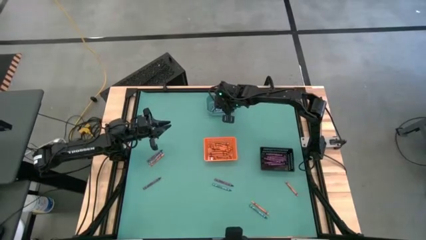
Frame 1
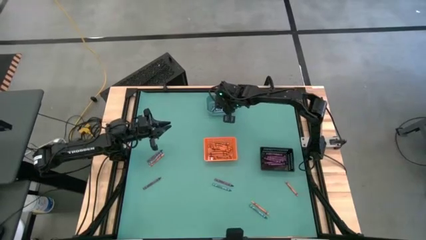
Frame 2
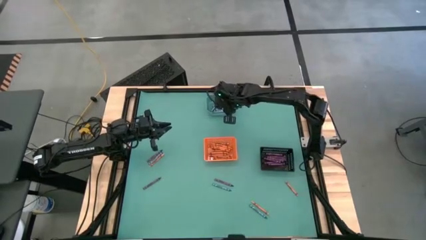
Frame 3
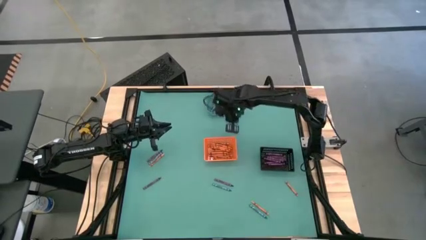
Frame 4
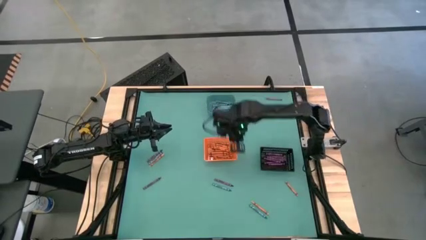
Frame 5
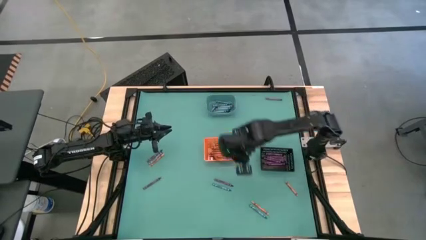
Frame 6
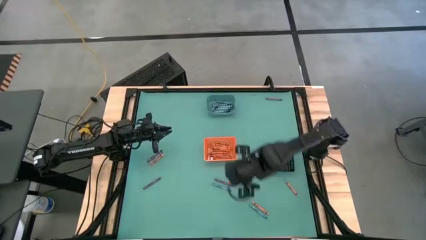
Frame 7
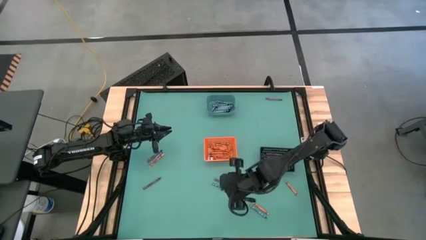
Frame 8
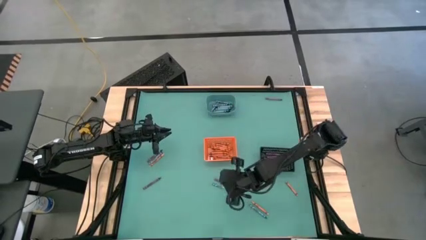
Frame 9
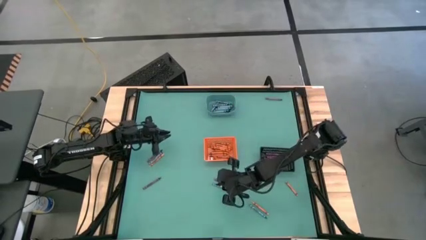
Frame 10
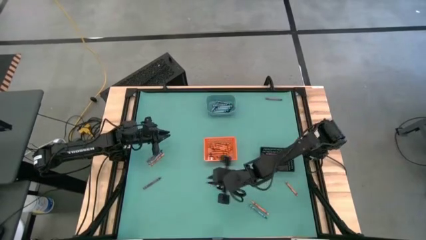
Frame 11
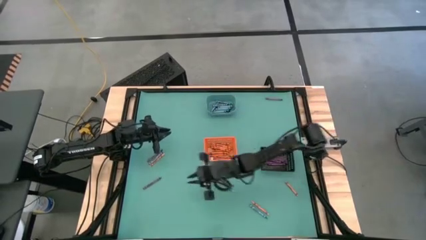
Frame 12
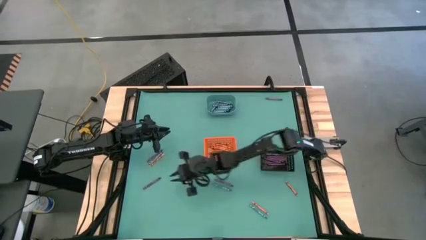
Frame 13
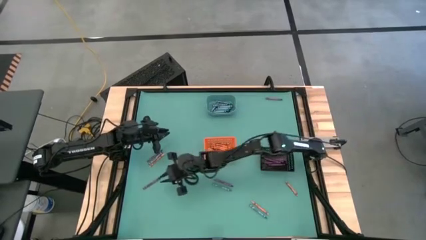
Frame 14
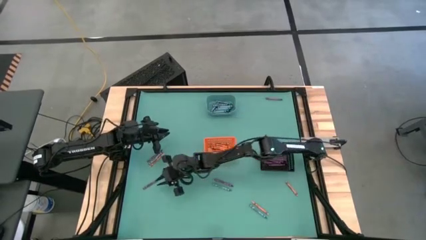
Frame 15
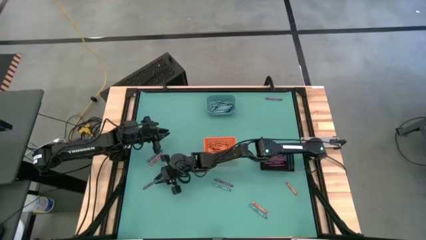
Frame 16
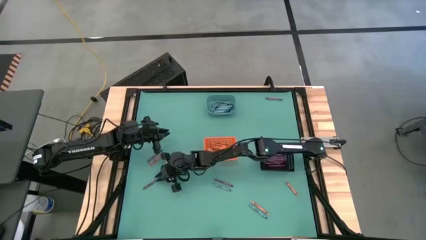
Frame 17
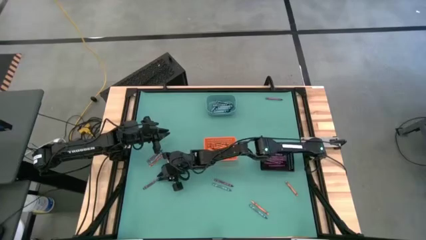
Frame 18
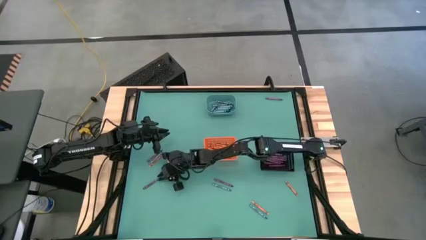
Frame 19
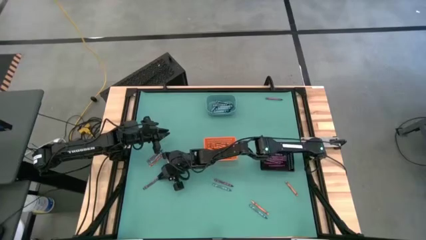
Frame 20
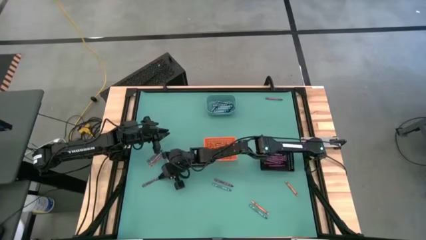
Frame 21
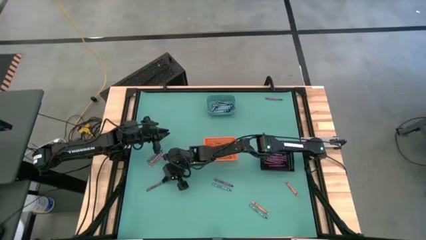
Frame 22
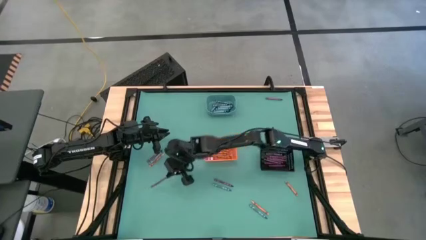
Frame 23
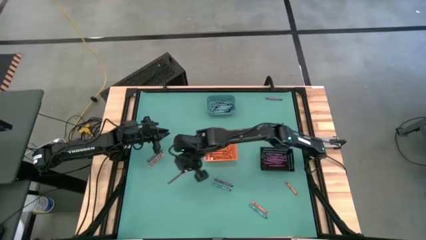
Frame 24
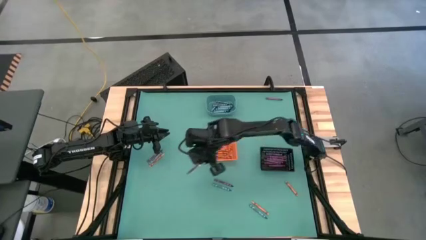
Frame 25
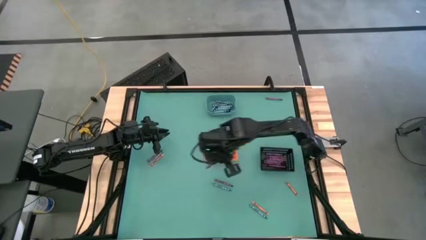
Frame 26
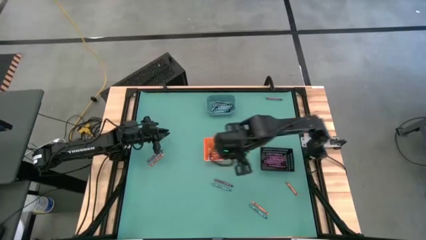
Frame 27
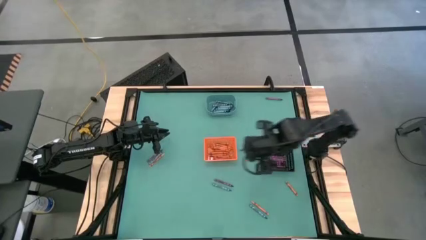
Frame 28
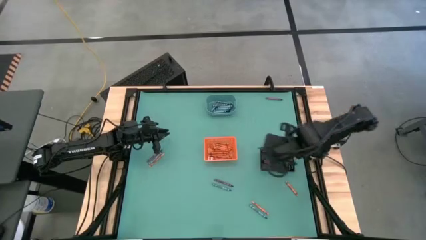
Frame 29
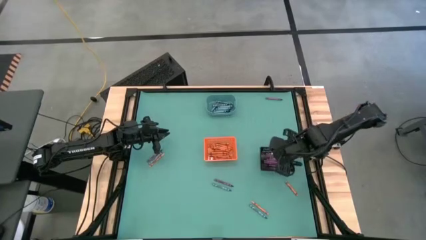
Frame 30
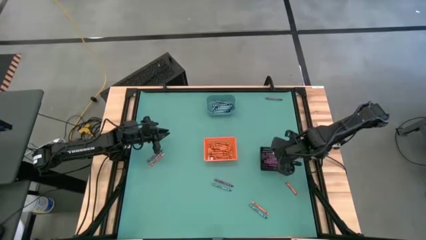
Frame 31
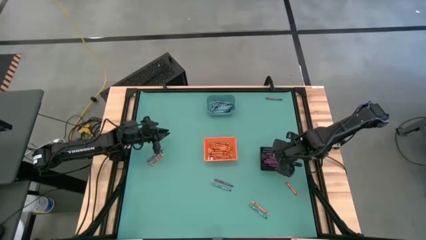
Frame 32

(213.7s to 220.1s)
Task: Sort crayons
Put the violet crayon into the black bin

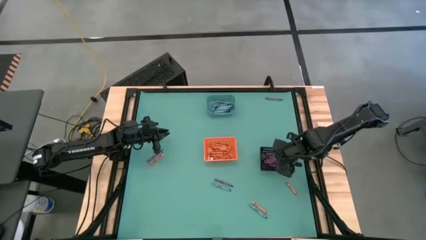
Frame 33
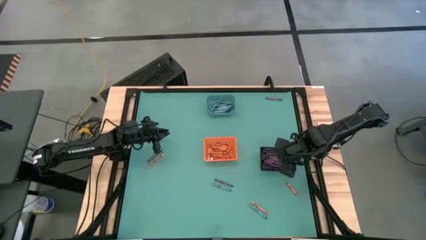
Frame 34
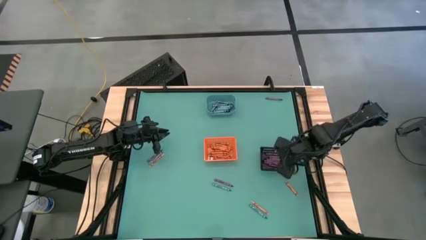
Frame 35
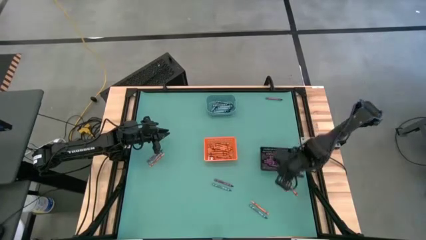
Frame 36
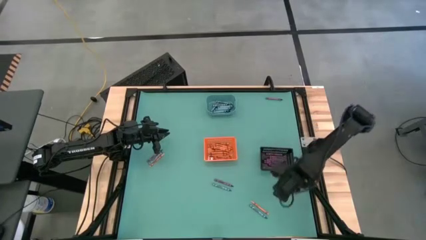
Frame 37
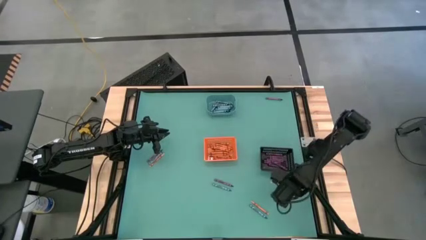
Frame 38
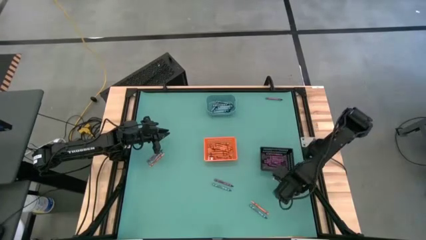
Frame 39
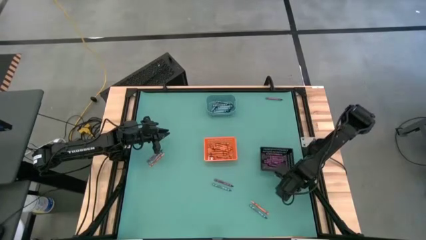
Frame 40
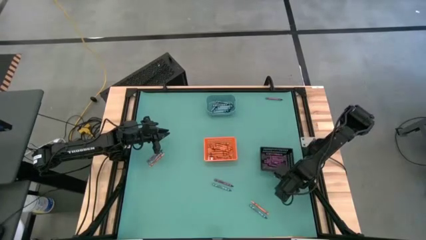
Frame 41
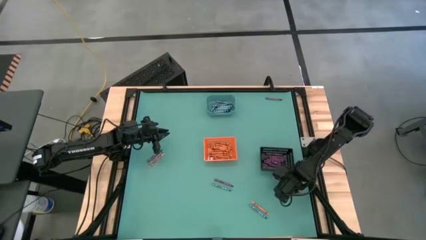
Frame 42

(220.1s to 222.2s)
Put the orange crayon into the orange bin

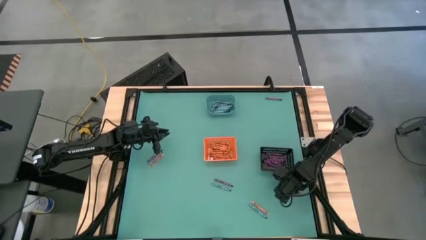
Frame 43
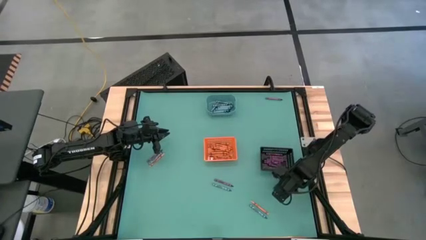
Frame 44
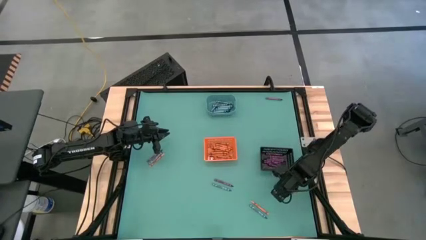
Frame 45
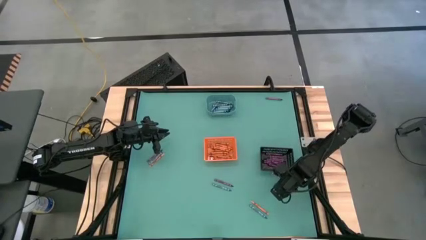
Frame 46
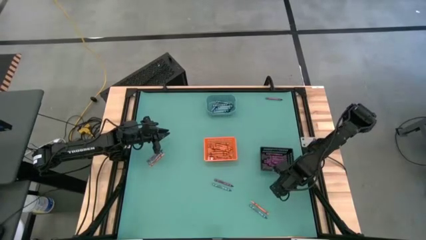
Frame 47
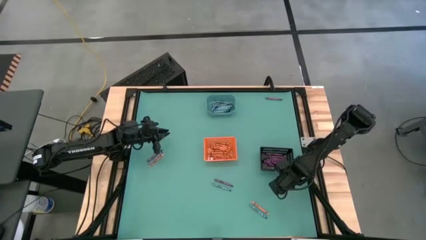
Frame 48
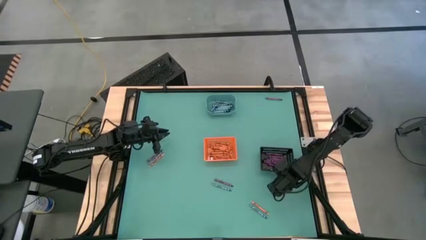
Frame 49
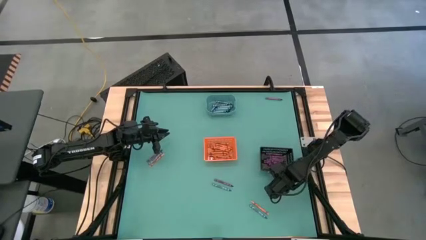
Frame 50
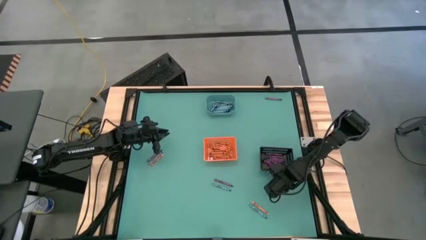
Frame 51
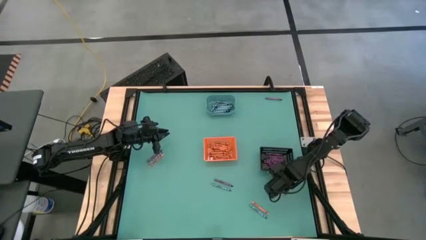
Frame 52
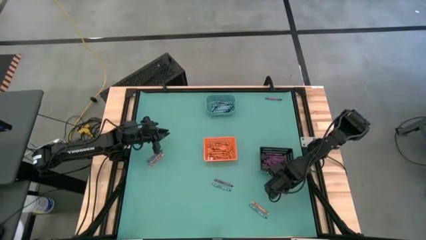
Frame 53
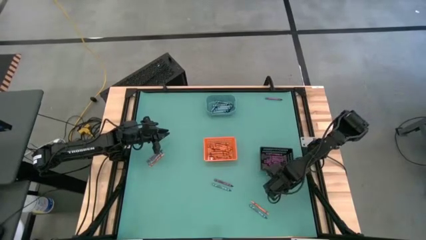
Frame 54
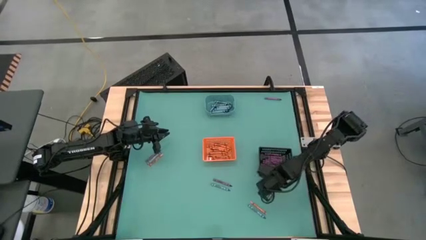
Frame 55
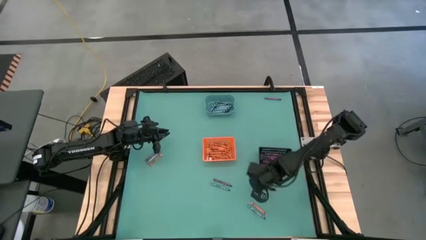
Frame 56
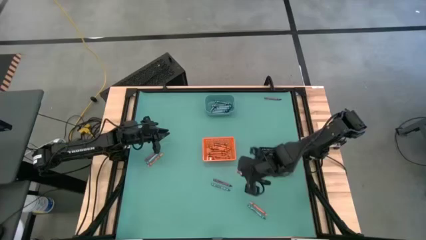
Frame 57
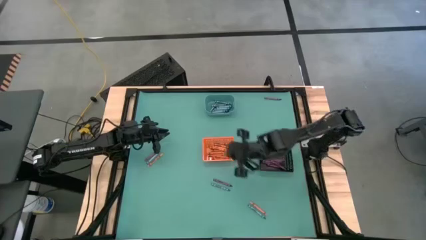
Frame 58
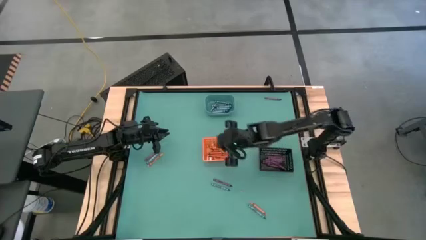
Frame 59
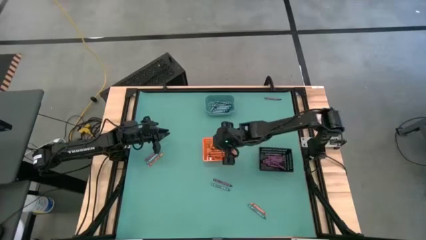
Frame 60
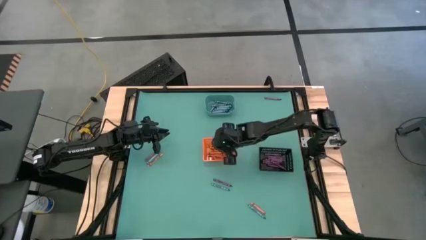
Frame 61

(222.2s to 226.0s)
Put the orange crayon into the orange bin

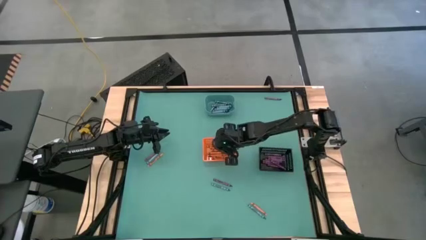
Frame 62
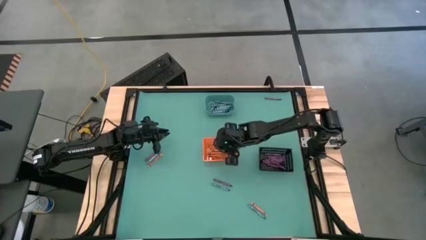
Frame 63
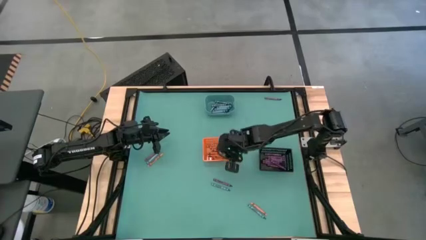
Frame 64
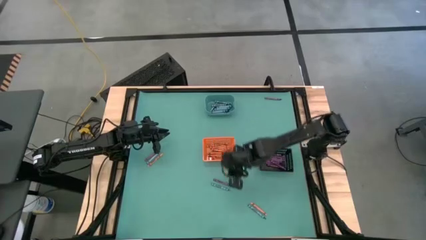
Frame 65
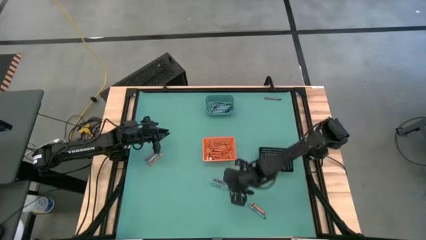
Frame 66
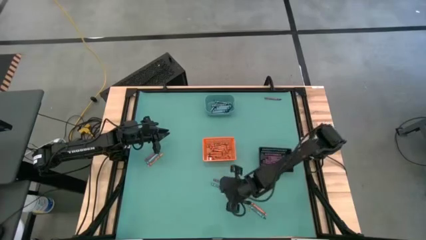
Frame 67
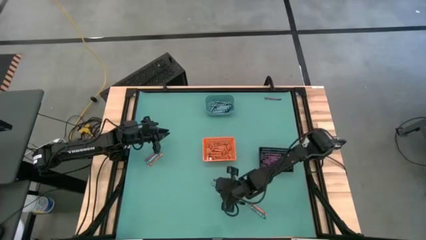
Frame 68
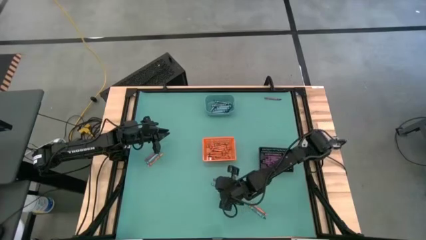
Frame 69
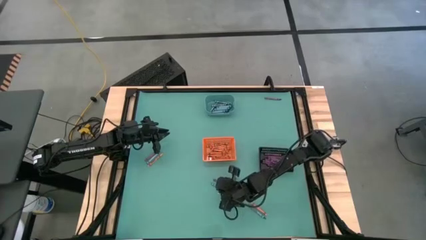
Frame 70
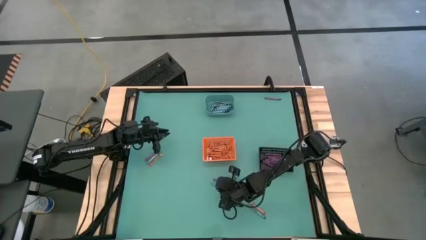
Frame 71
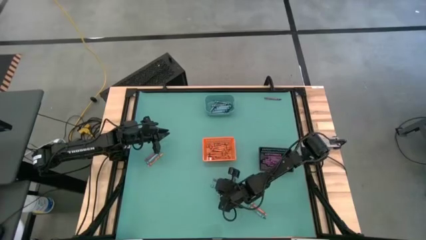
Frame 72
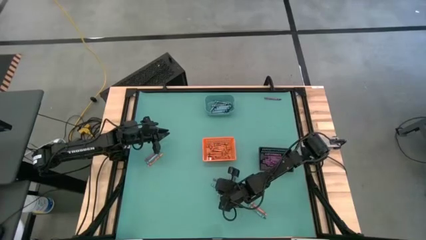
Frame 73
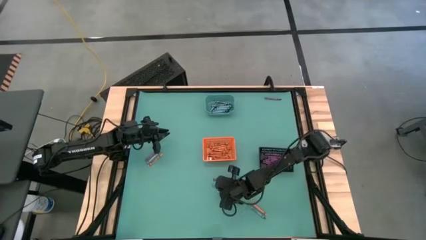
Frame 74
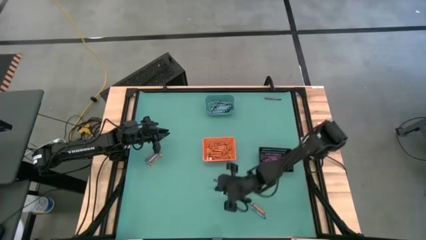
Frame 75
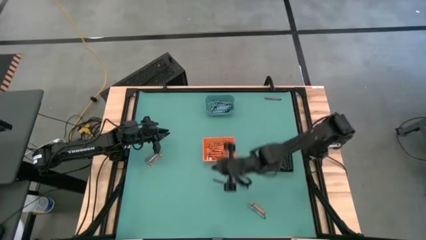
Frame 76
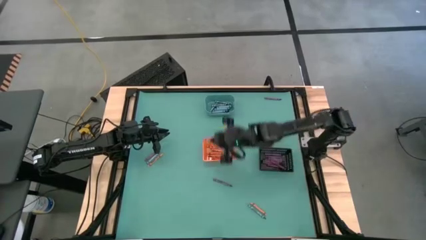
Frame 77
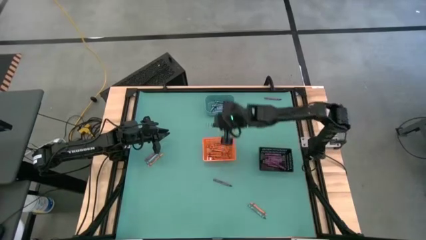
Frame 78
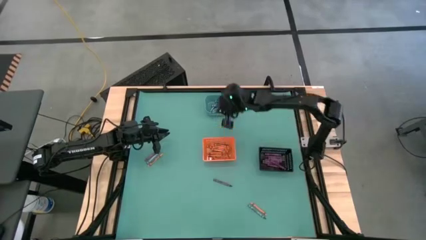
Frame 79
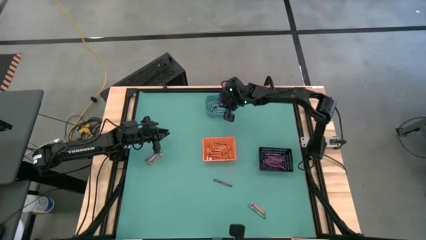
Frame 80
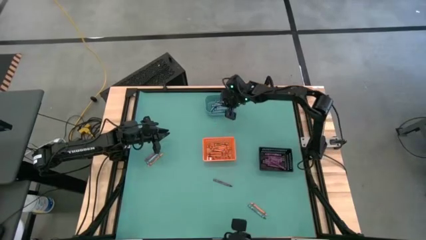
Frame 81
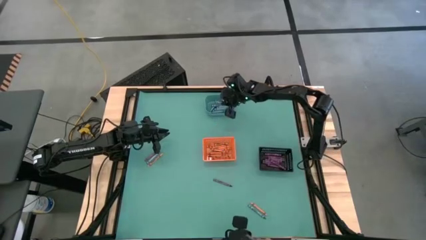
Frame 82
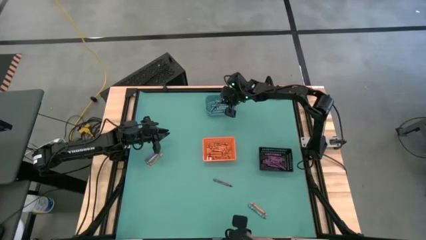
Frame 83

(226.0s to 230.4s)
Put the green crayon into the blue bin
